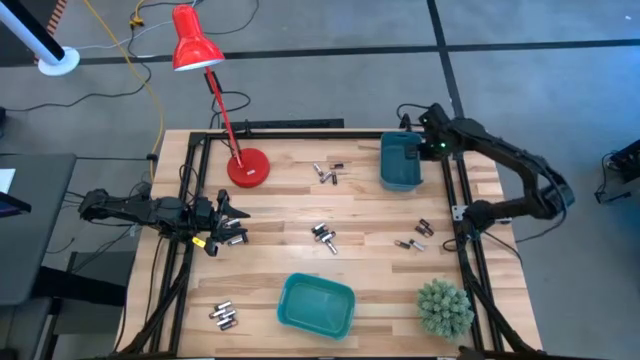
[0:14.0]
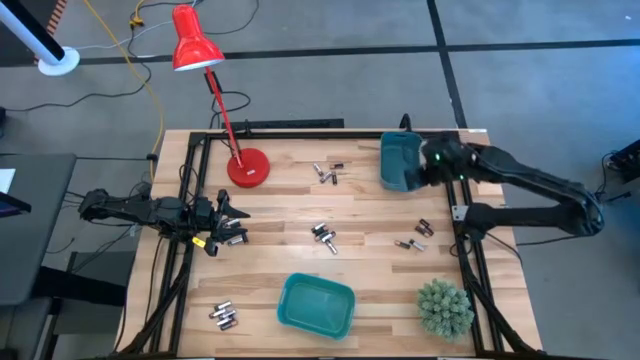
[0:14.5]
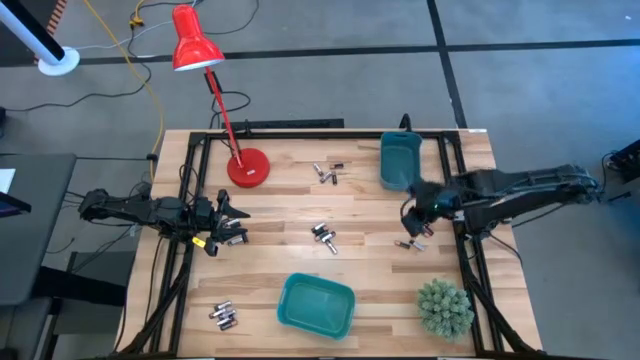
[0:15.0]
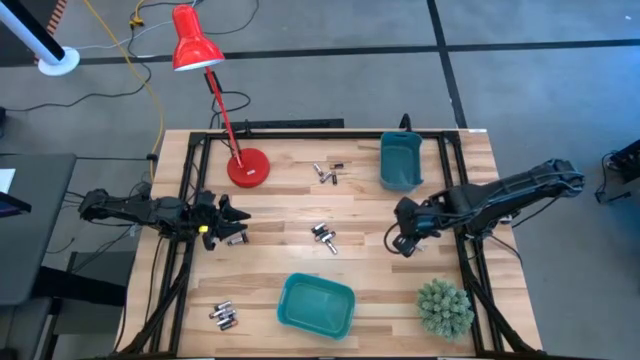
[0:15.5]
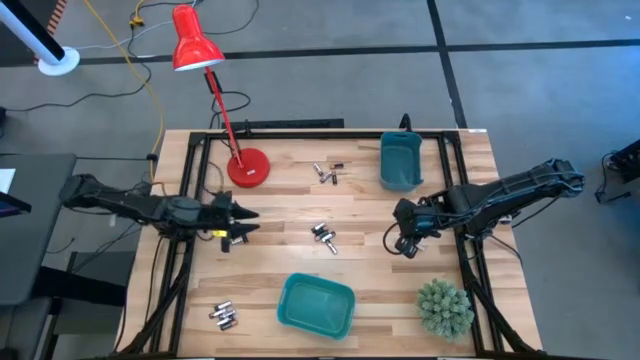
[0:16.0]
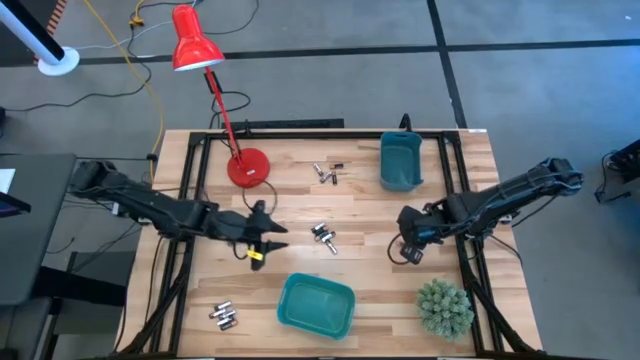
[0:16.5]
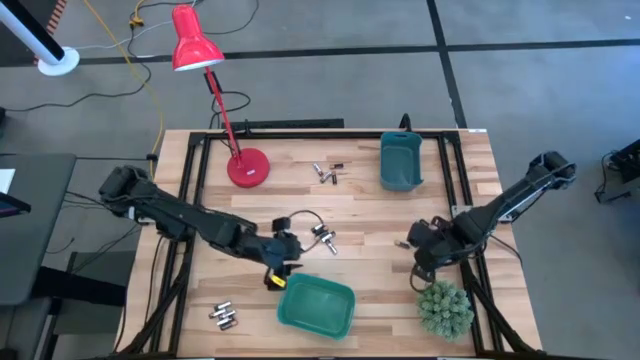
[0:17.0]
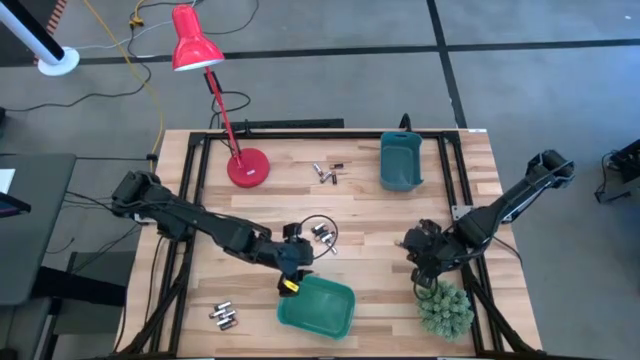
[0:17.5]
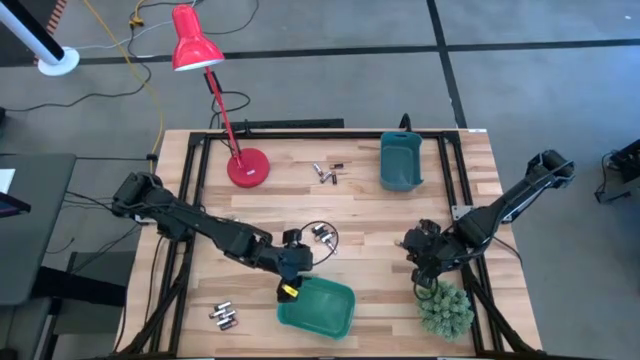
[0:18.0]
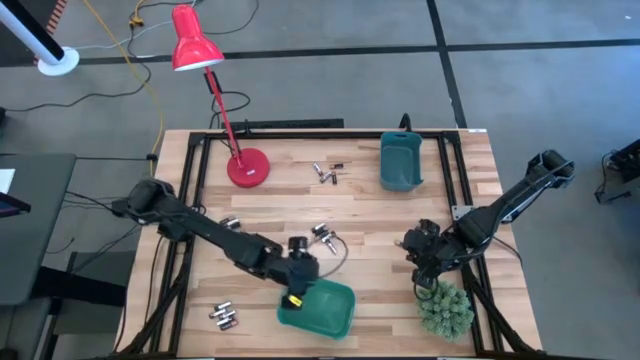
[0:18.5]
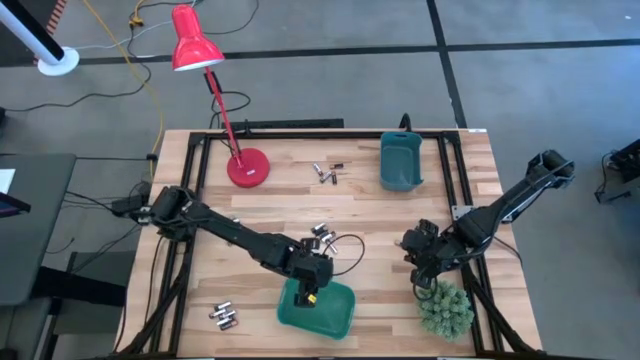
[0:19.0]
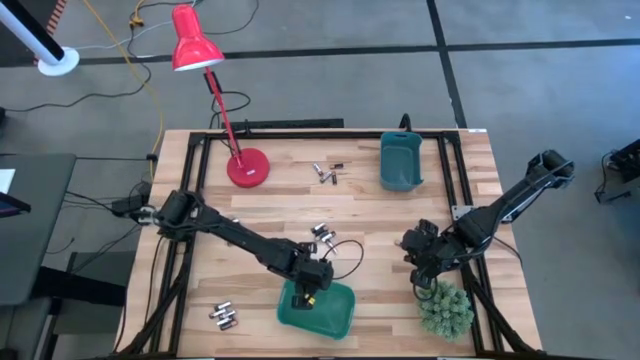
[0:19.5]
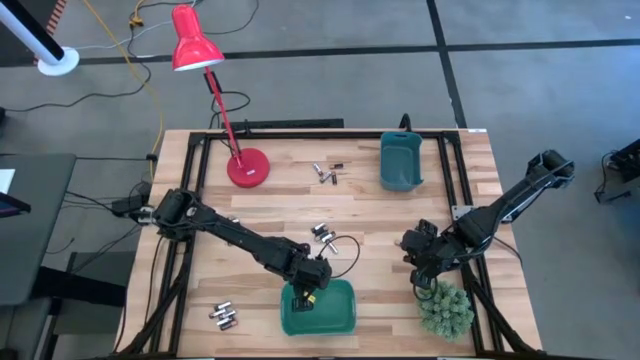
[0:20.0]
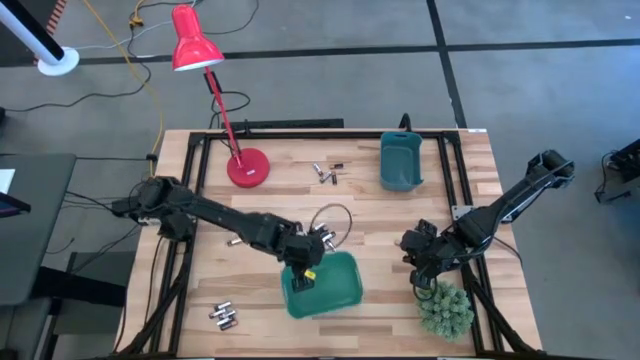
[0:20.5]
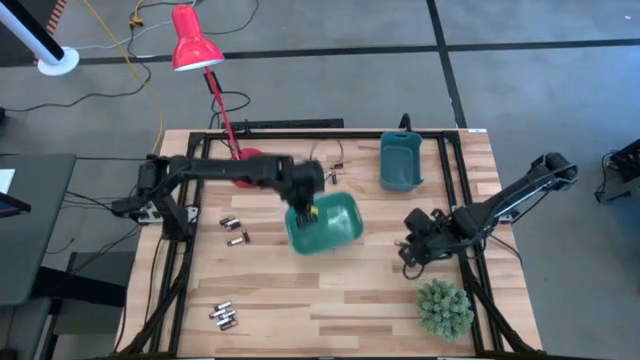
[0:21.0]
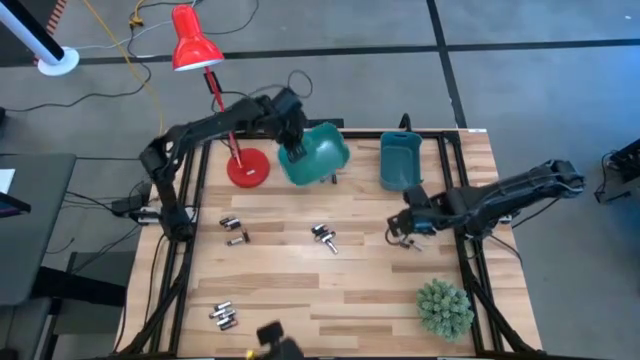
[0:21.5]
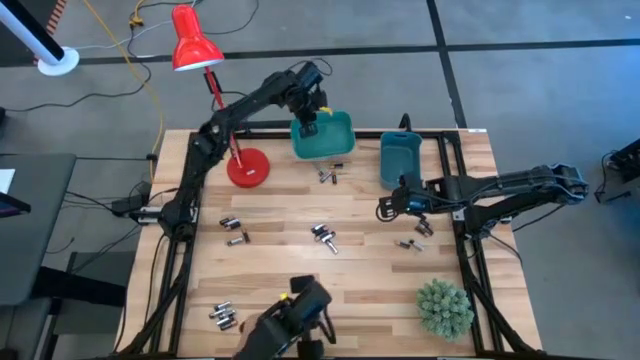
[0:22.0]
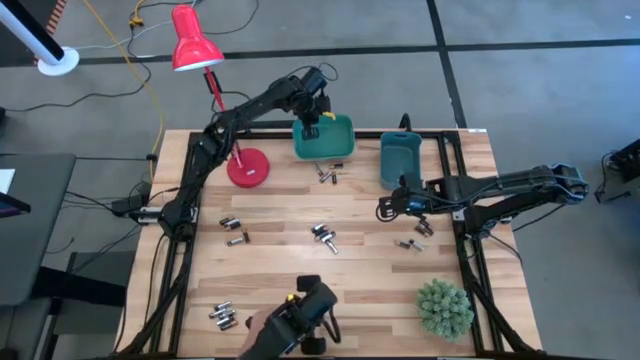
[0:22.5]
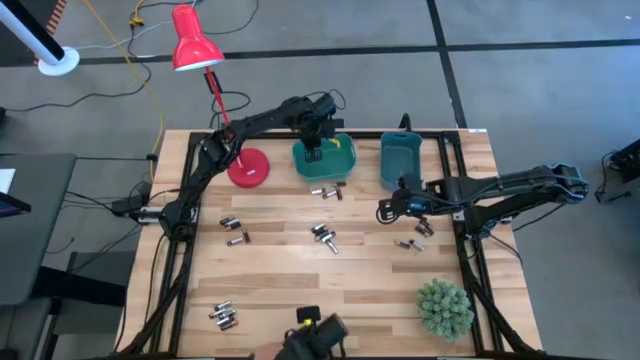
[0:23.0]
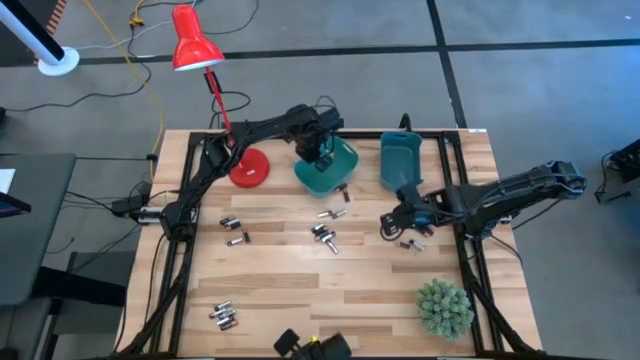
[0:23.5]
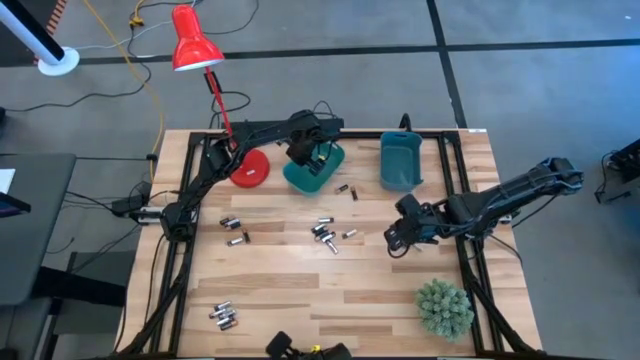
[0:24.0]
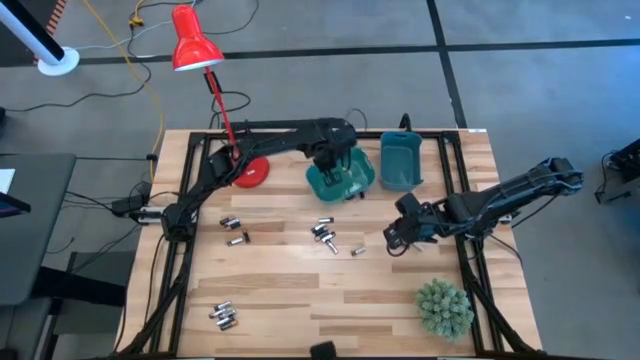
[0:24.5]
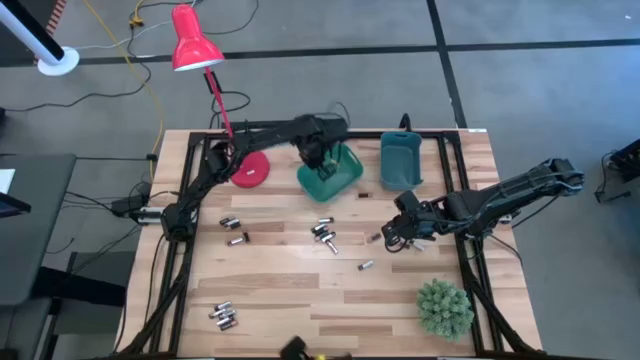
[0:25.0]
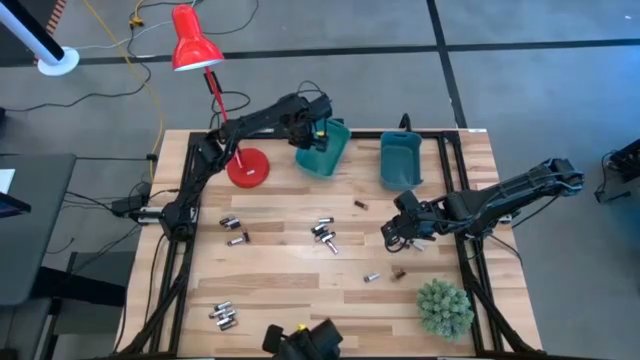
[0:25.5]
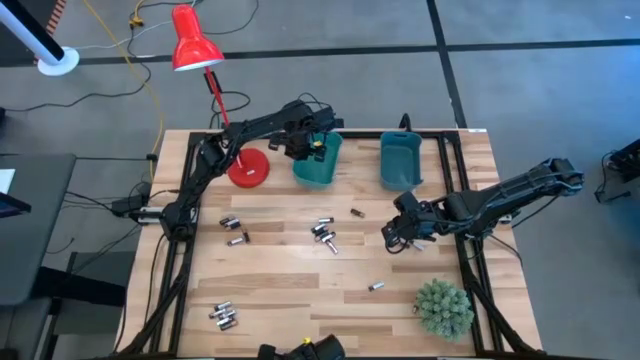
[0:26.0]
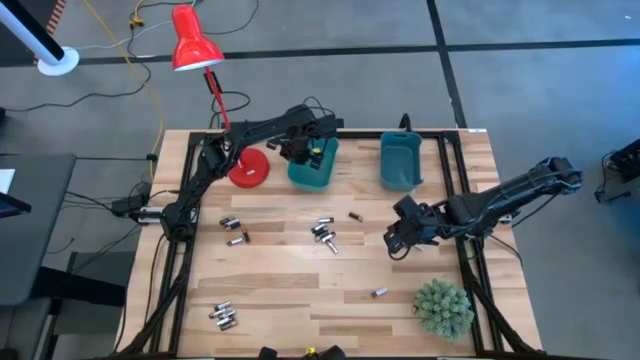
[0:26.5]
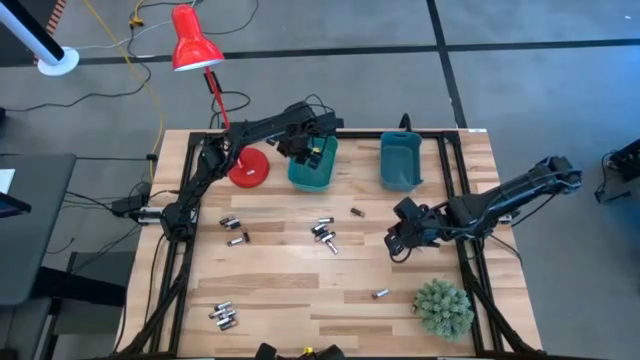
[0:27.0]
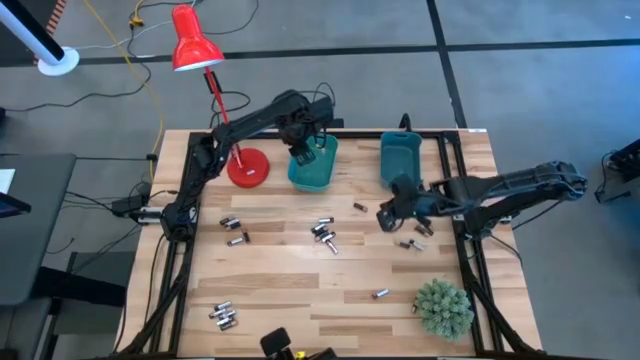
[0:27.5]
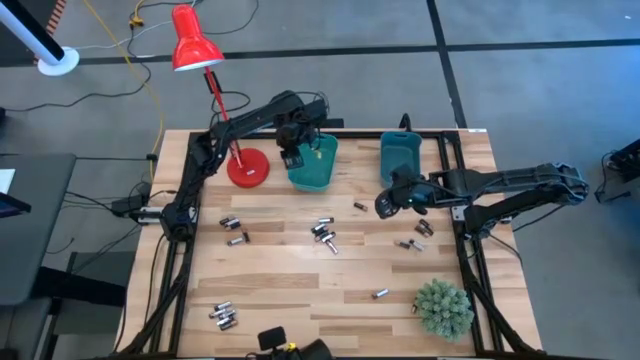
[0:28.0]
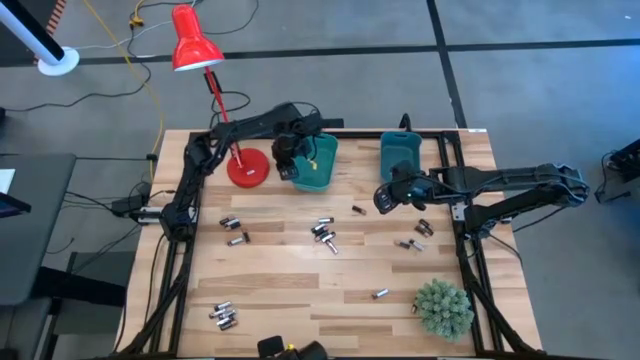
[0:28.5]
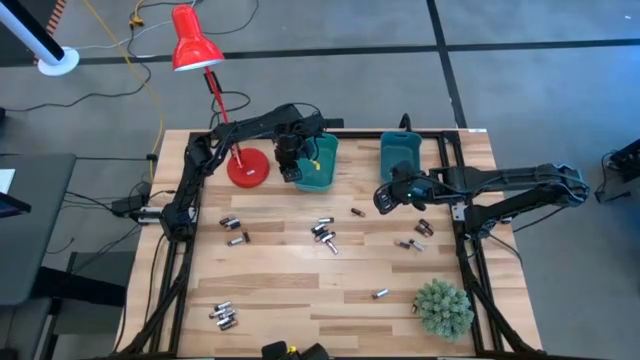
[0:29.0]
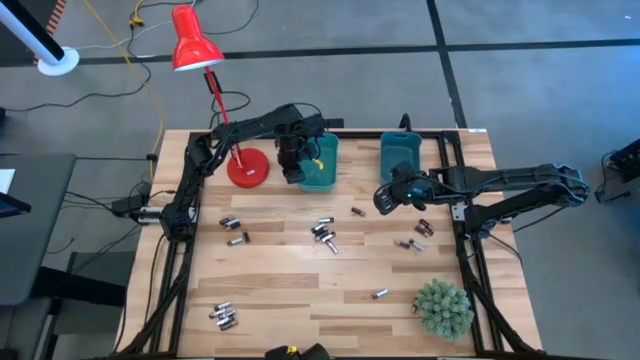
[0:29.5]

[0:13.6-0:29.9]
Task: Sort batteries
Move the green bin to the top middle of the table

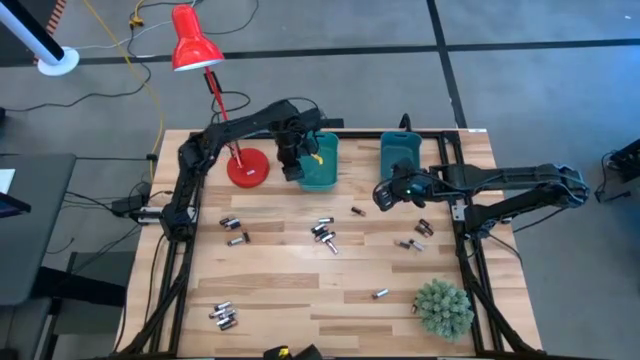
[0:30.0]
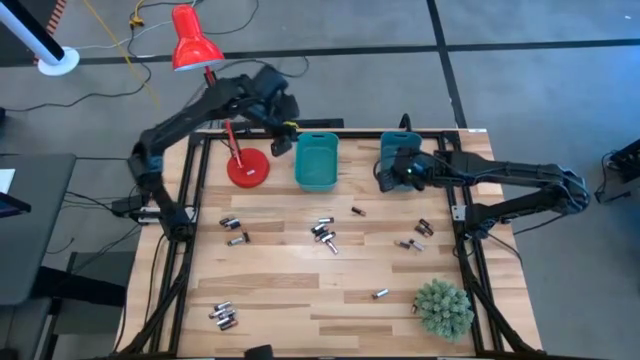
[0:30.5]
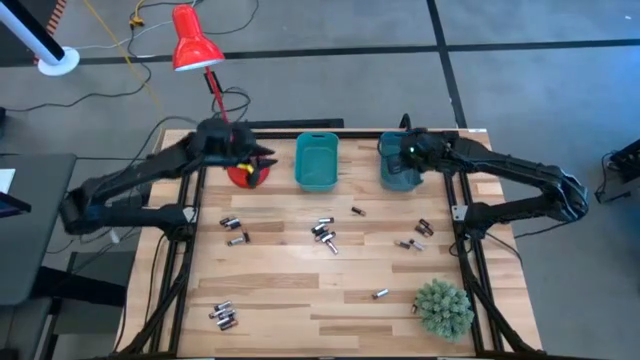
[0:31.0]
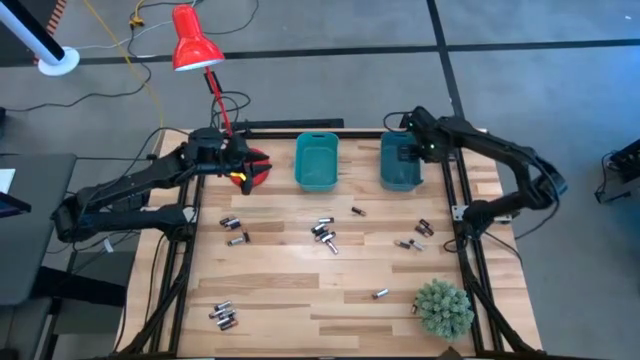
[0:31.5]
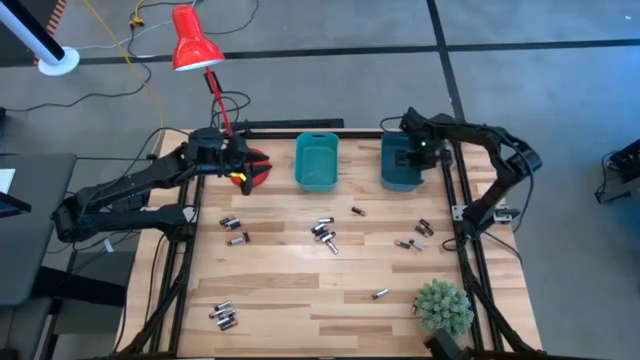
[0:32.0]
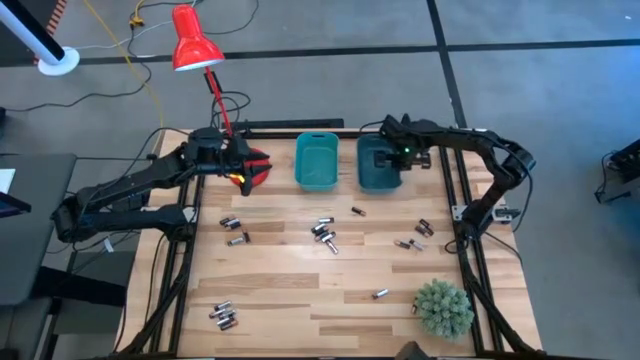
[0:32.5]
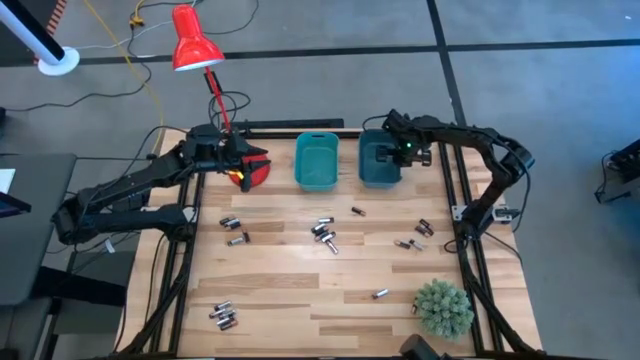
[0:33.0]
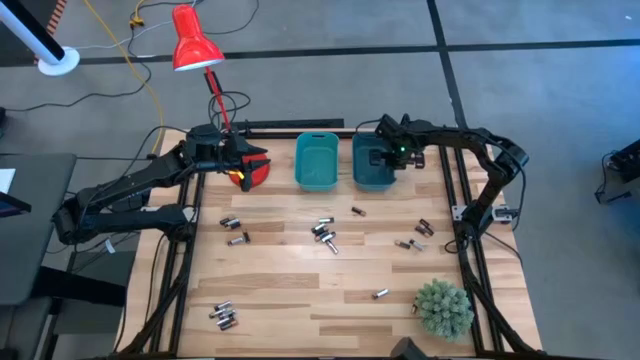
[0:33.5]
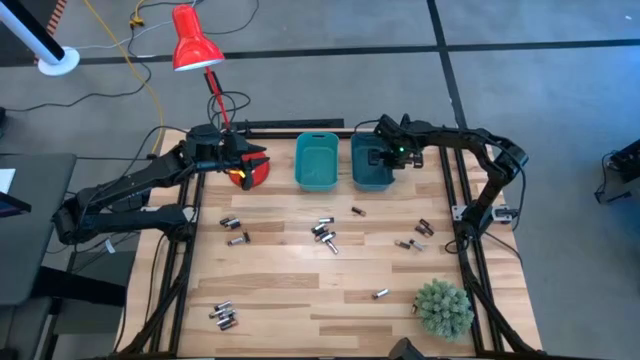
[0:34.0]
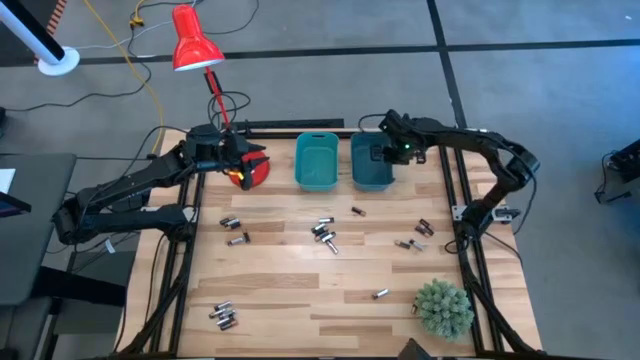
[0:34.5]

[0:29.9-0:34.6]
Adjust the blue bin beside the green bin
